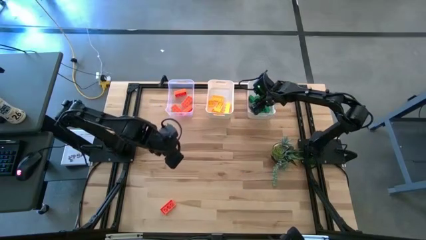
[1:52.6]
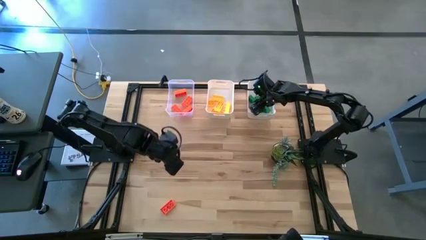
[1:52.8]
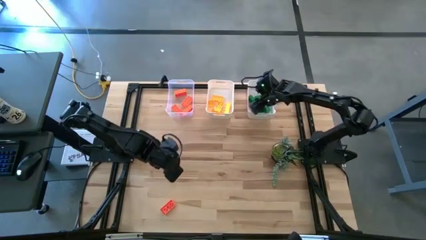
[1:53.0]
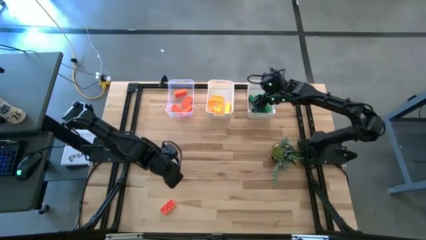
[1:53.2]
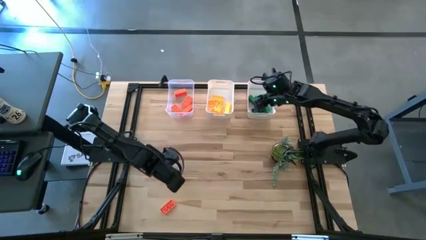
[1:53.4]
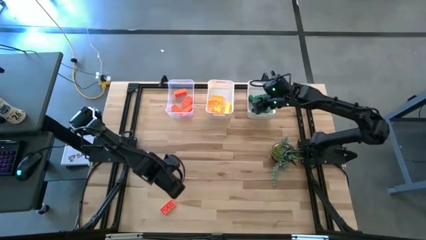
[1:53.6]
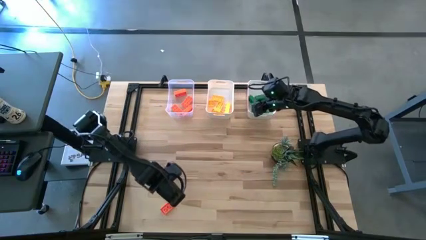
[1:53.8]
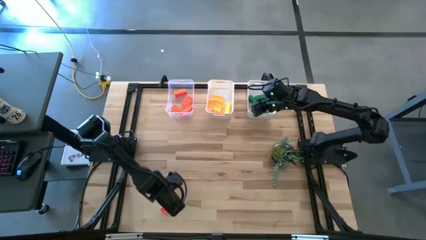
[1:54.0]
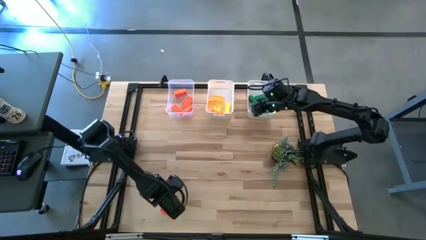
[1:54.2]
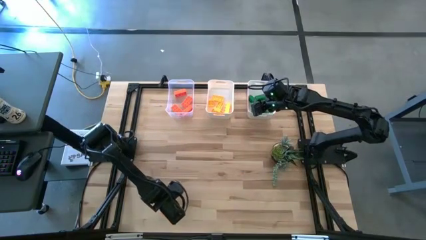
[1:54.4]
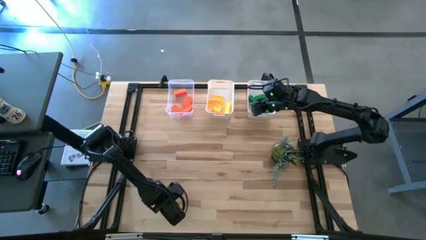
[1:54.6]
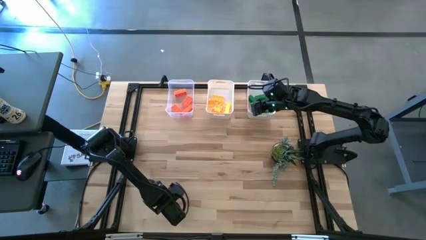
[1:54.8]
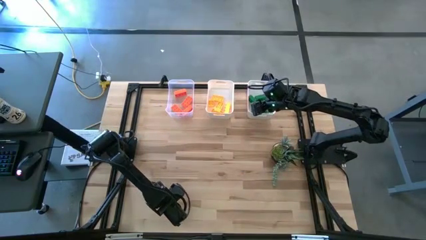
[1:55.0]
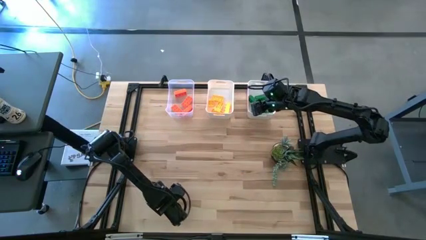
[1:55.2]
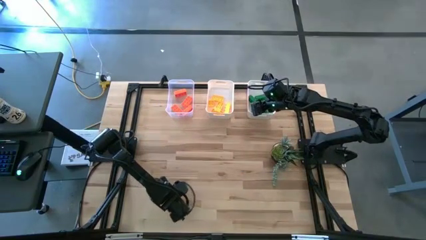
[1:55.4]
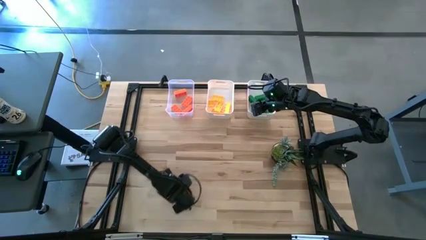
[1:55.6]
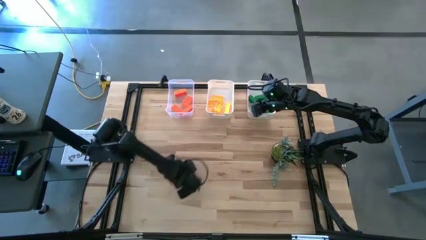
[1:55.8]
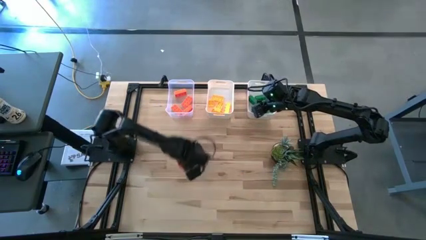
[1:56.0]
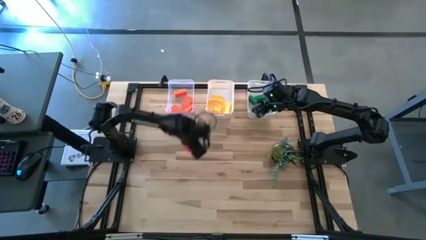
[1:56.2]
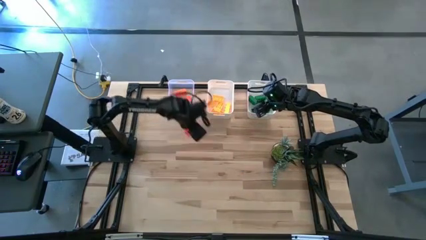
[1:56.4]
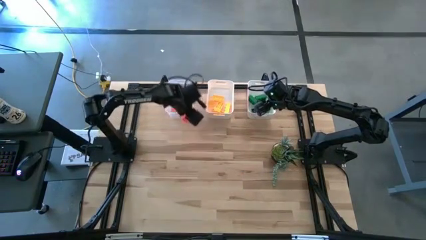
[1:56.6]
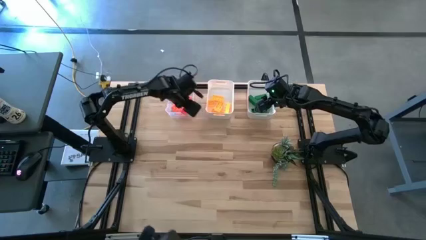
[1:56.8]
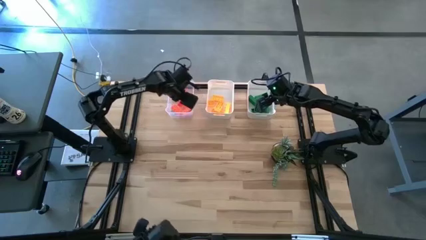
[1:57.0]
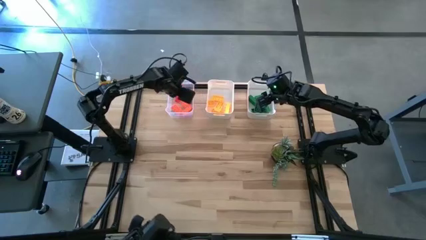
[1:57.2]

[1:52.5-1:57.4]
Task: Sort & place blocks by color
Put the orange game piece into the transparent bin

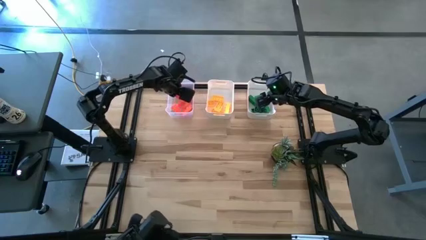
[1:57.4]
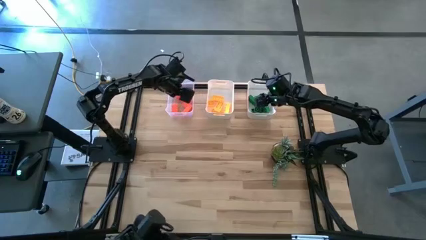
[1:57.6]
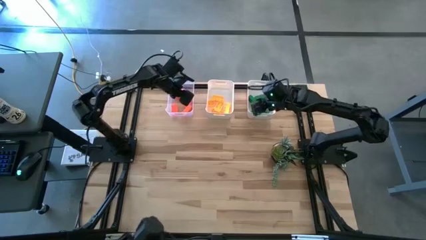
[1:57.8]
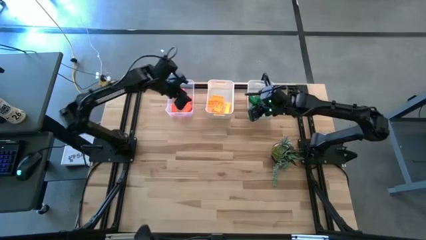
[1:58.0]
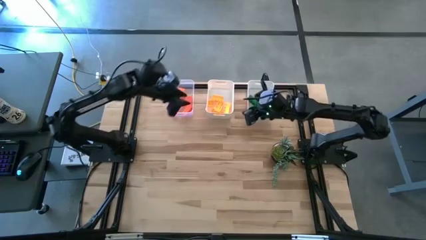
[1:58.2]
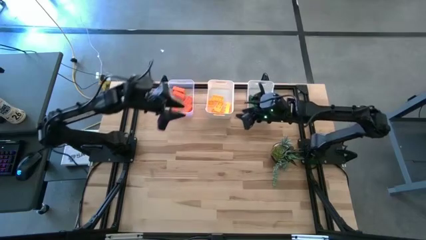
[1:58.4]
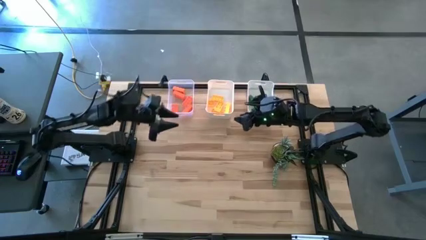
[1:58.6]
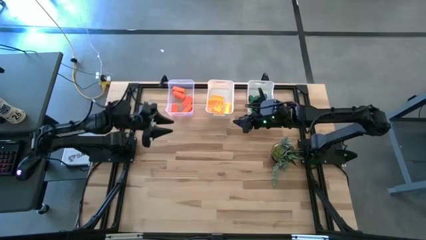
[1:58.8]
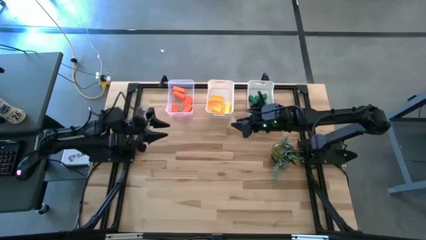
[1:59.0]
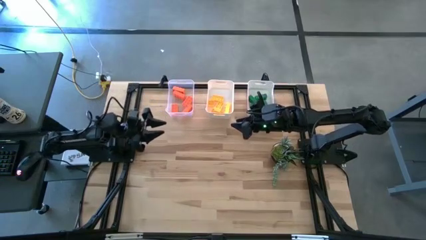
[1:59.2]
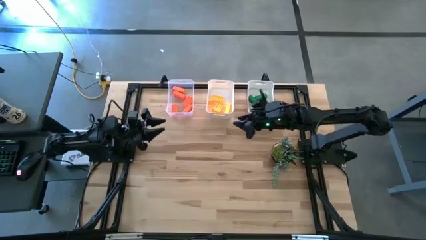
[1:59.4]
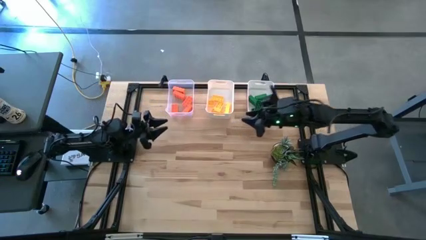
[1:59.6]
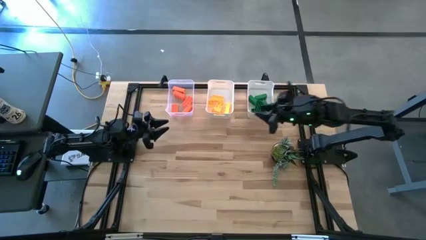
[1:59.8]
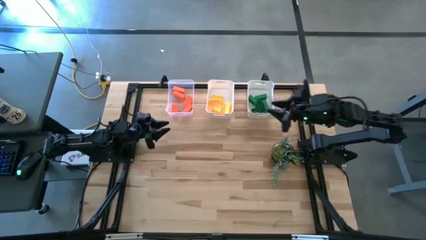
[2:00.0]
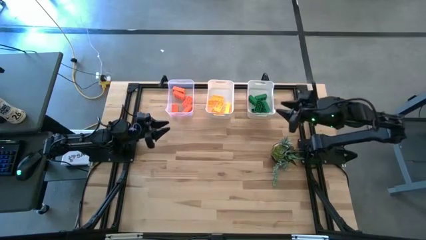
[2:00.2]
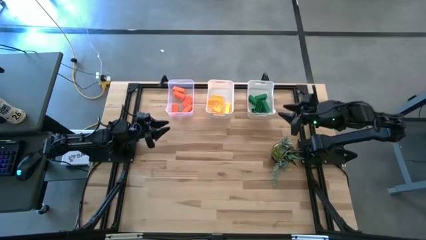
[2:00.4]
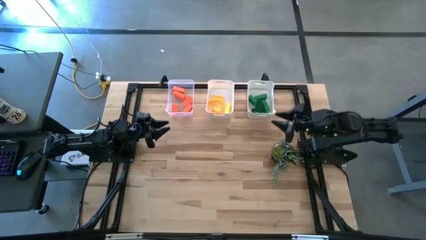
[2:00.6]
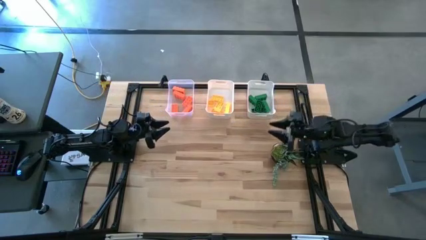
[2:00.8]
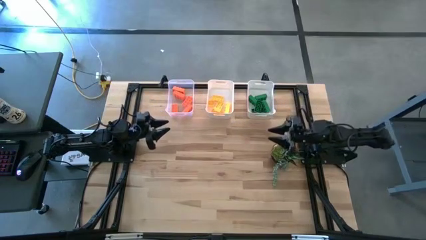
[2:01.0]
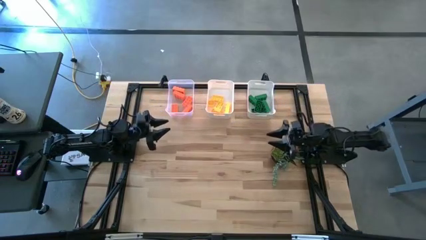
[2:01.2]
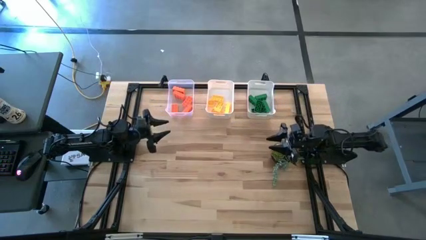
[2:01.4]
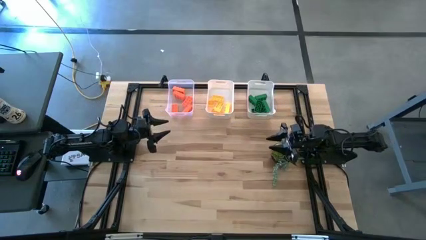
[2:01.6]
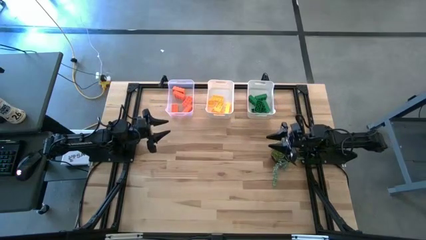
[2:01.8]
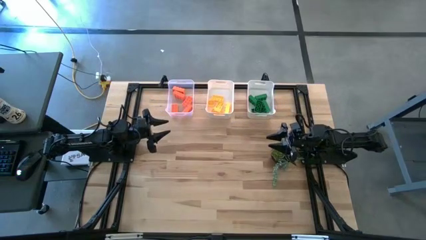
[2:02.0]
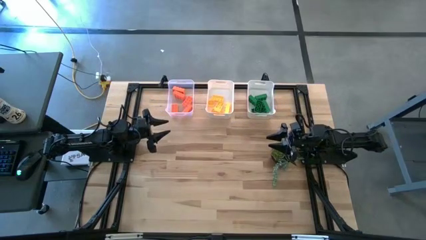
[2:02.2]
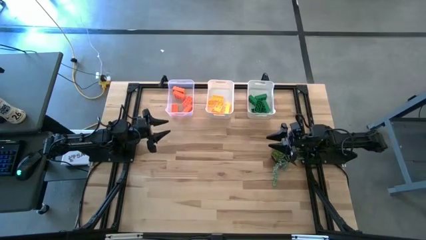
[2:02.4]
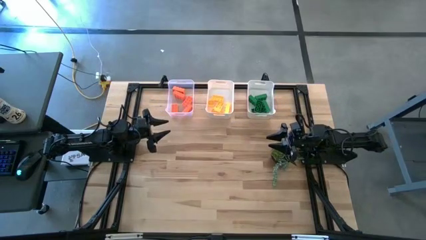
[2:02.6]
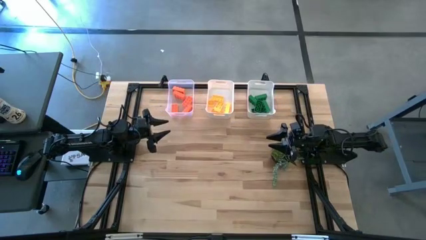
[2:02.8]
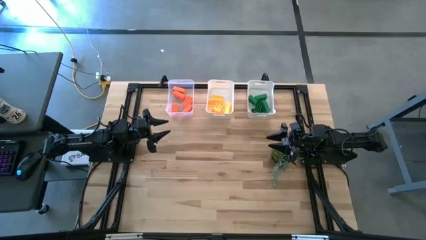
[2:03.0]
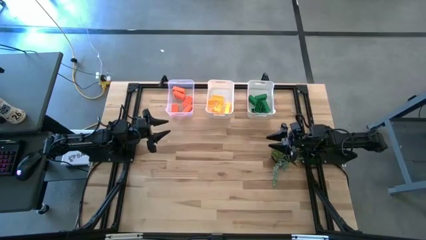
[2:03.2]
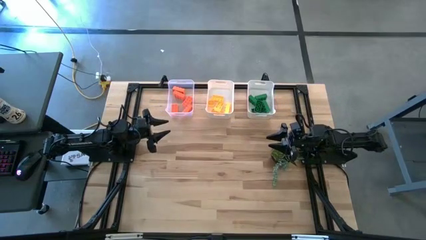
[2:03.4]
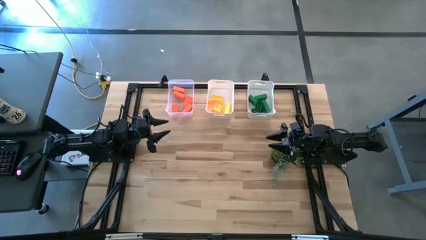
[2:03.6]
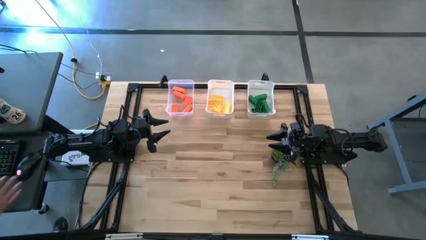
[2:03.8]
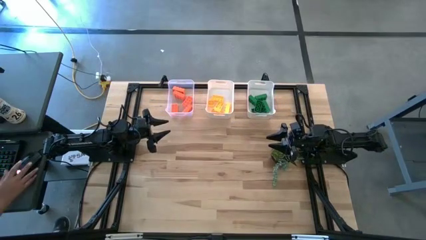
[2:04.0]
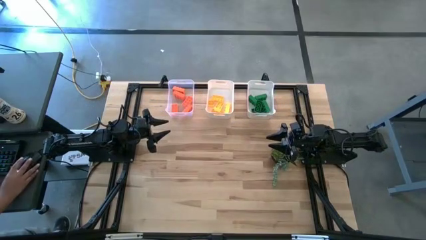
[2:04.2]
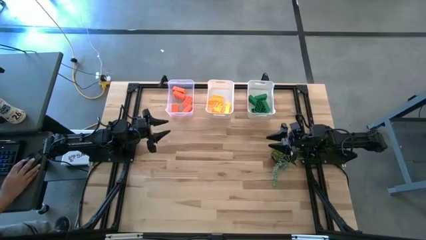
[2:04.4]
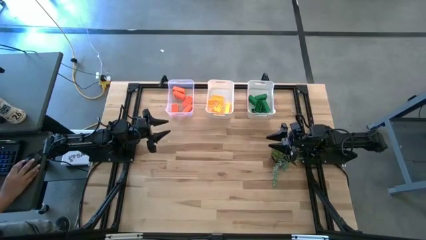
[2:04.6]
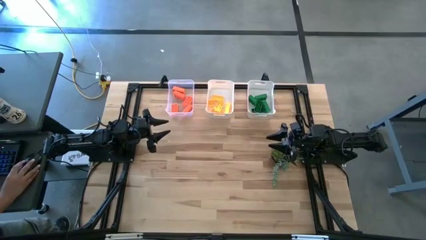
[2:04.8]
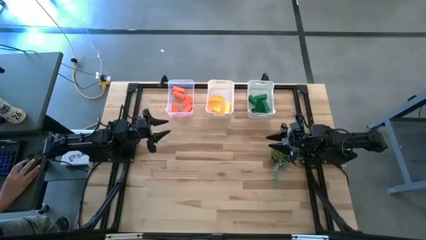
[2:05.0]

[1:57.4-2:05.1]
Return to Home Position
